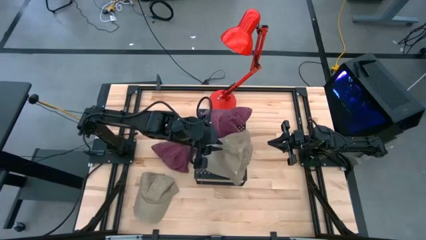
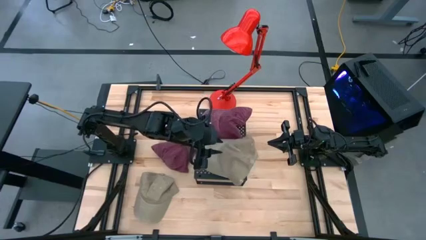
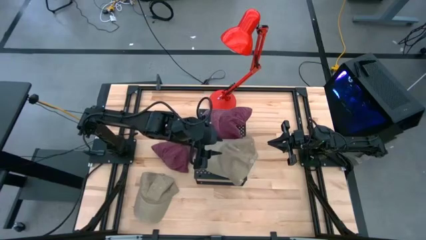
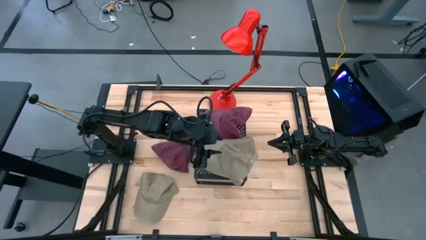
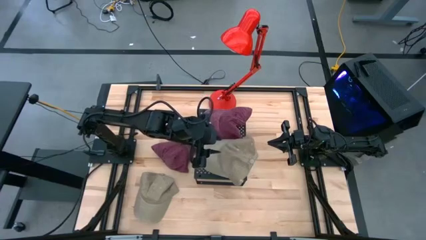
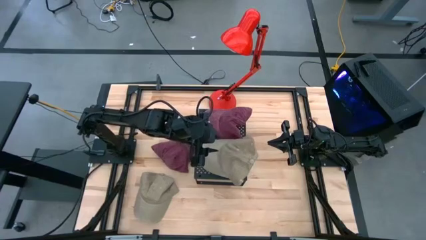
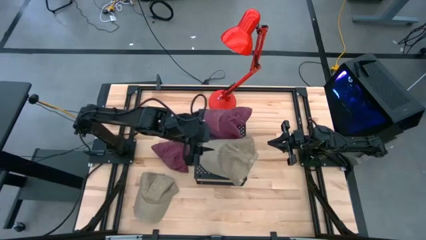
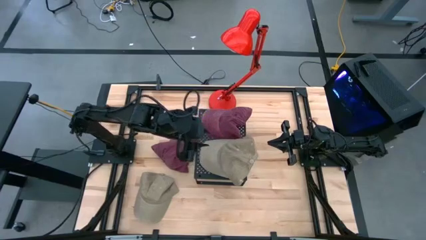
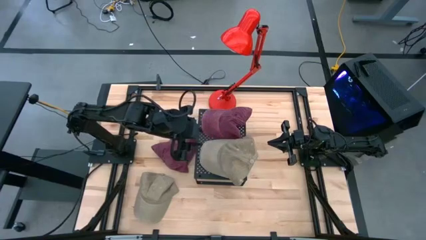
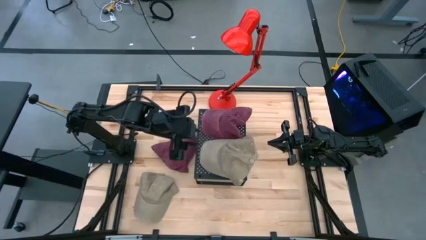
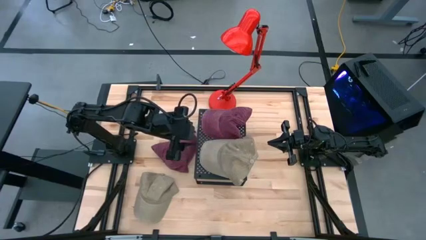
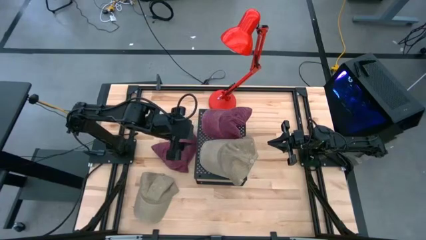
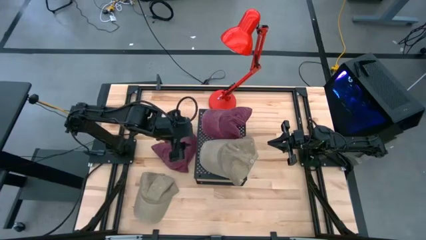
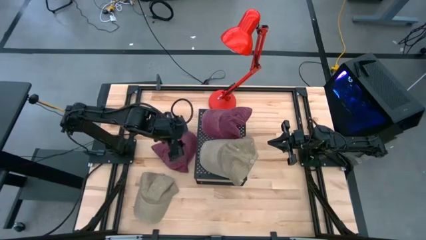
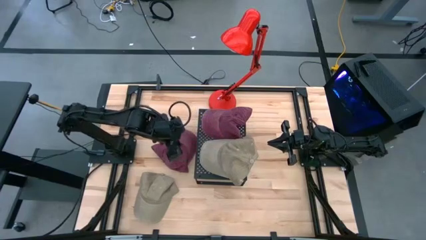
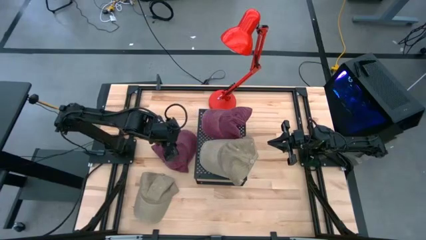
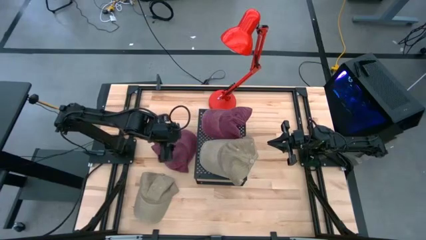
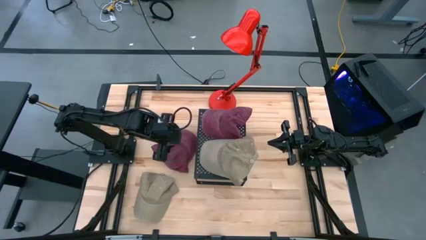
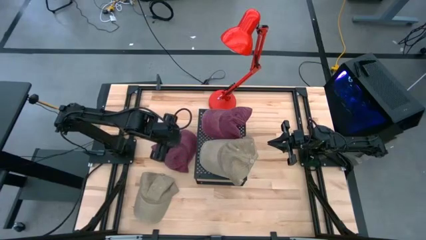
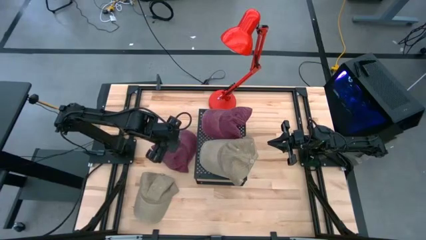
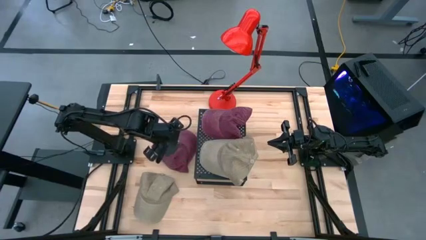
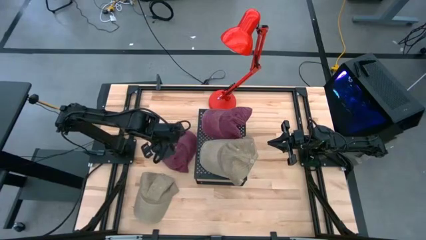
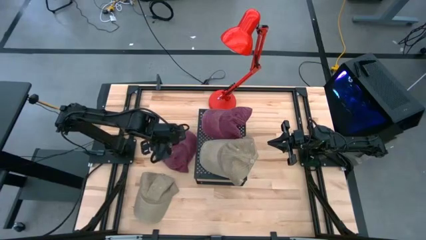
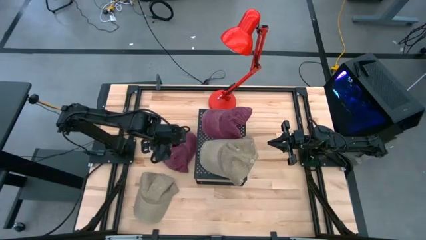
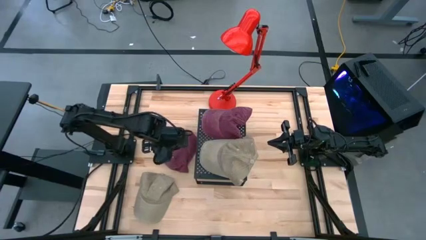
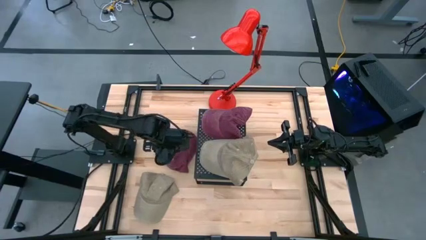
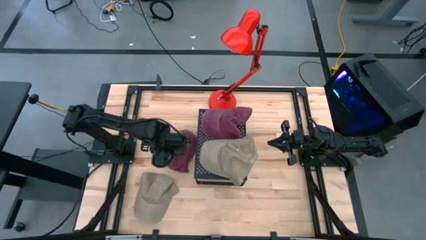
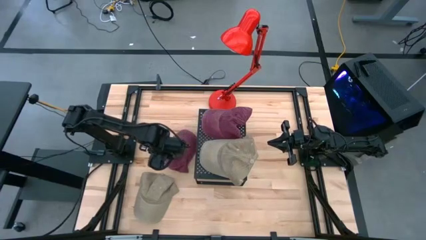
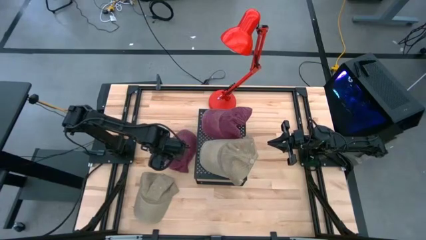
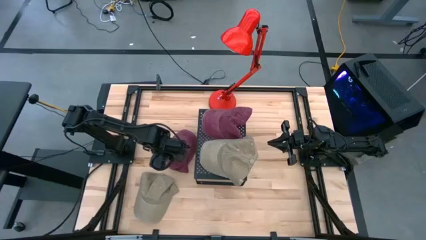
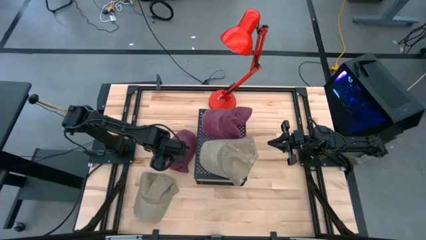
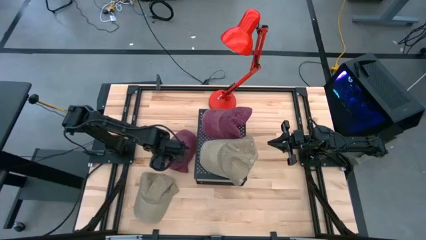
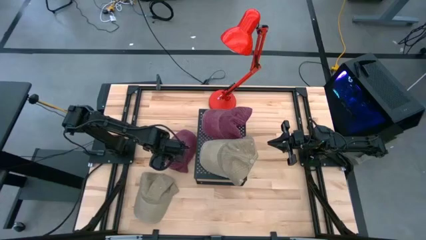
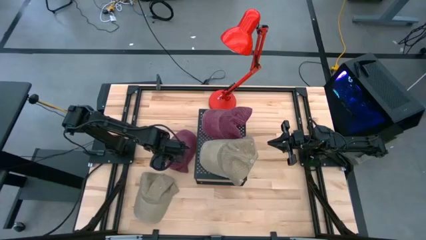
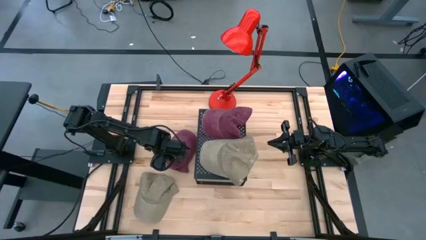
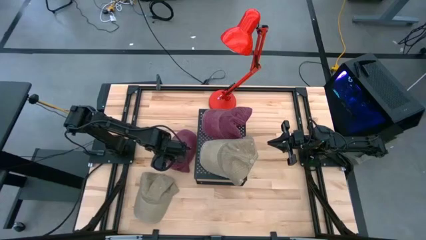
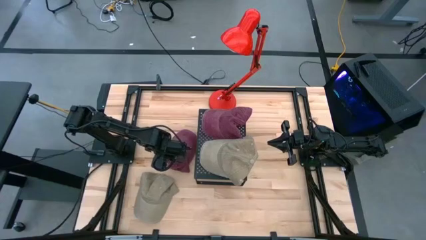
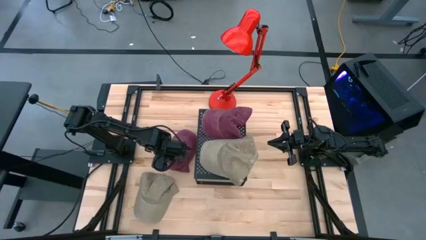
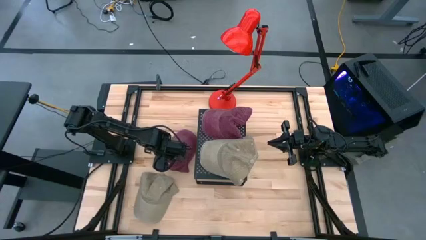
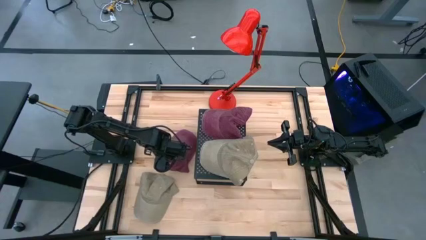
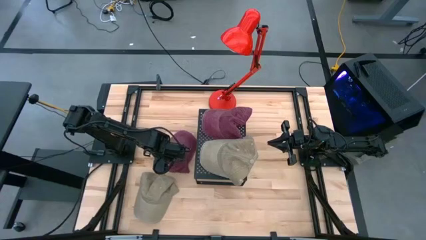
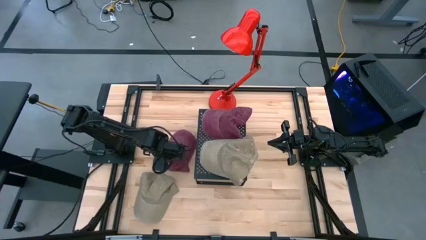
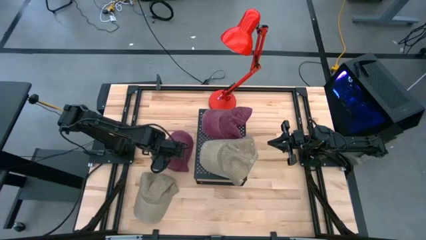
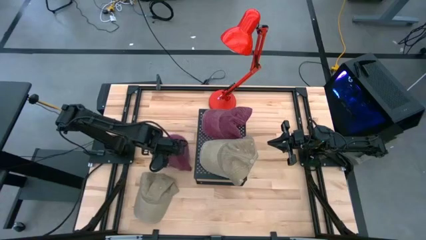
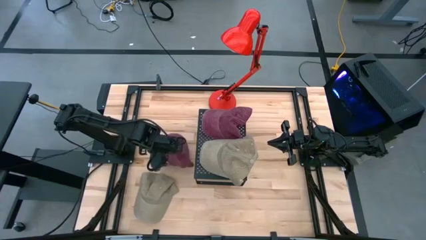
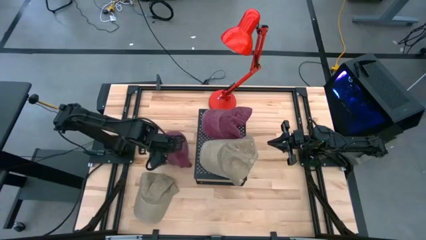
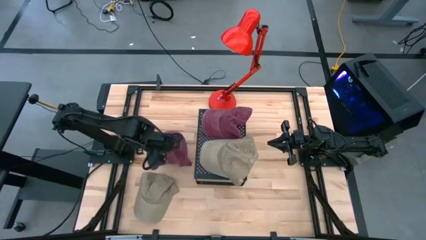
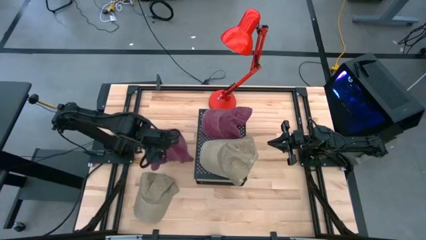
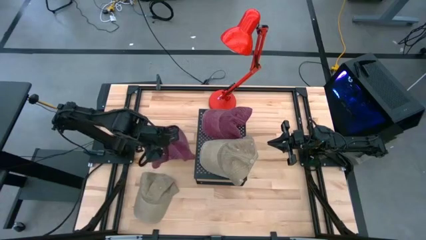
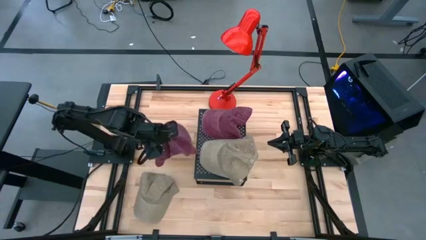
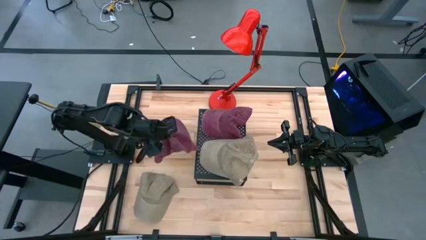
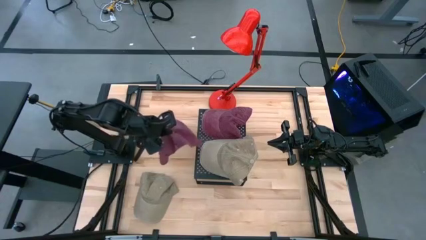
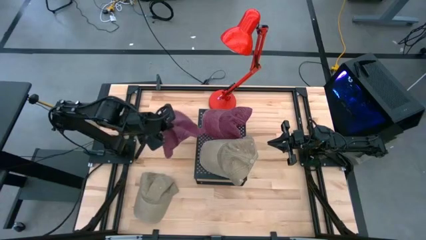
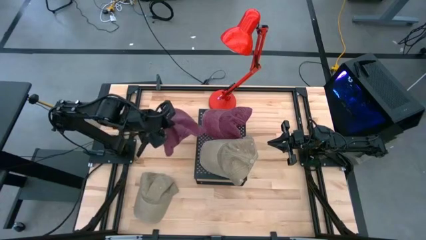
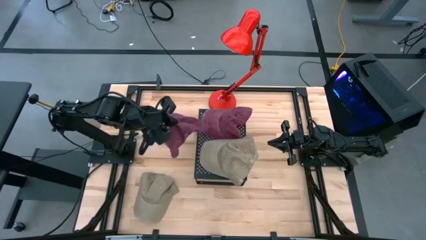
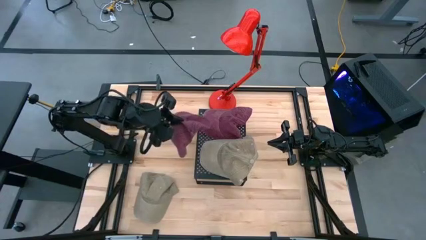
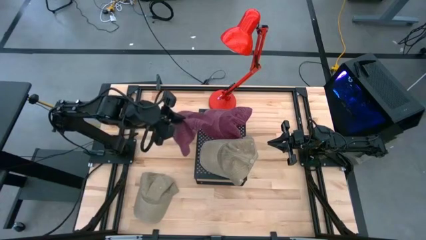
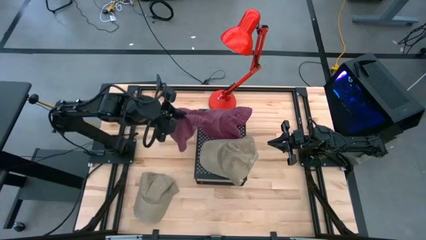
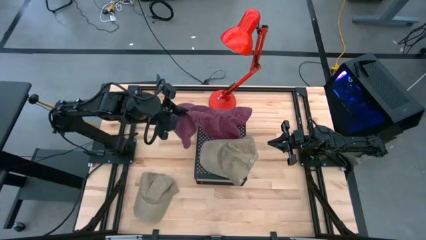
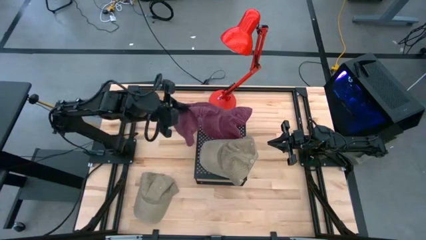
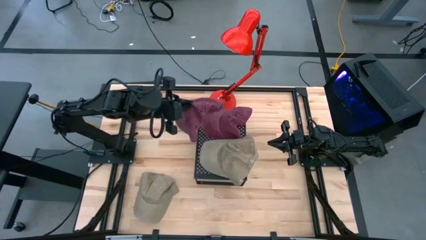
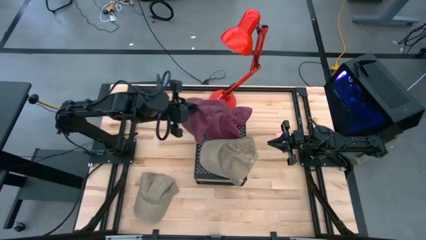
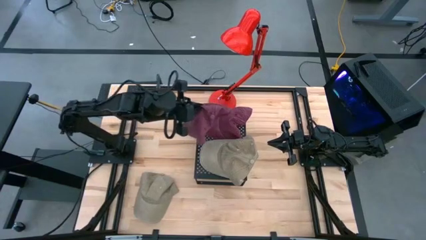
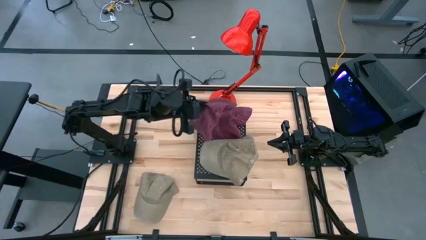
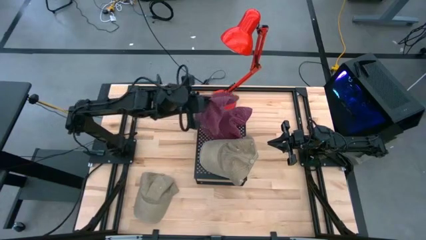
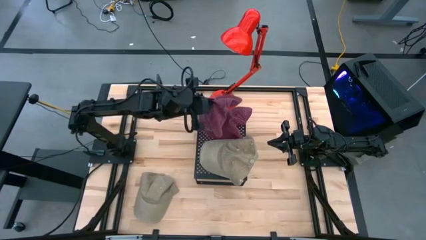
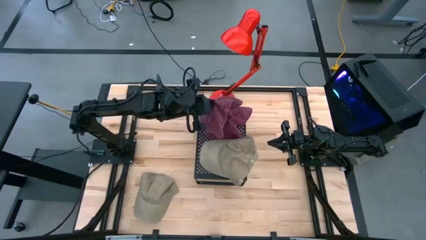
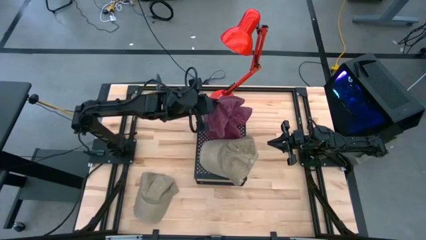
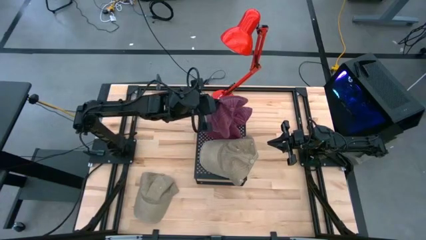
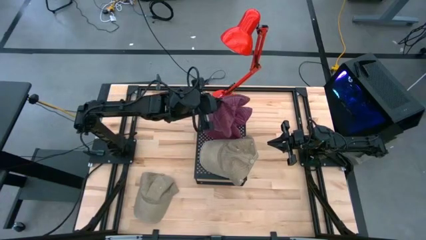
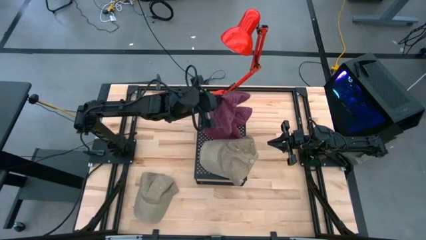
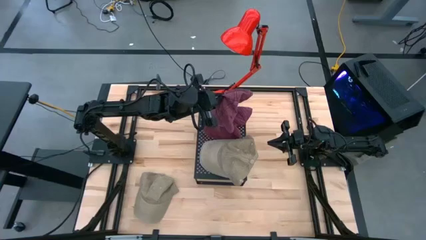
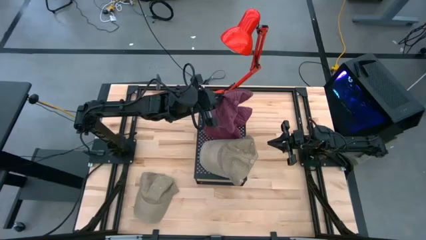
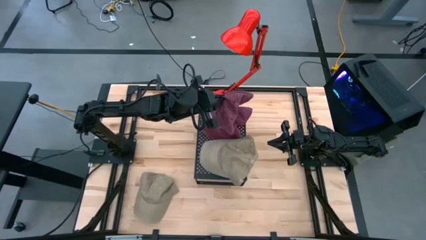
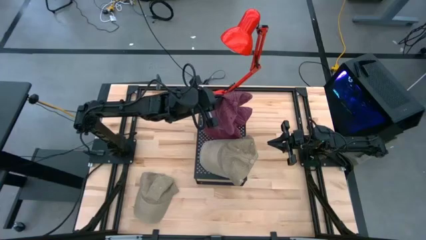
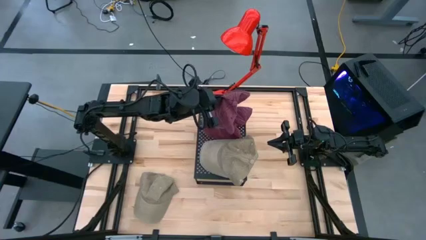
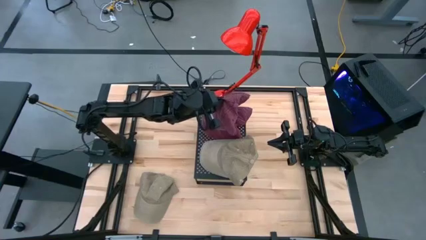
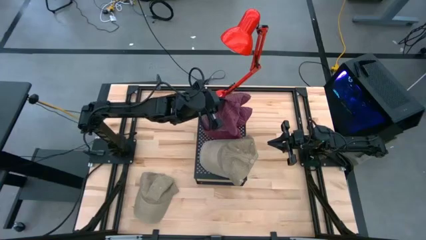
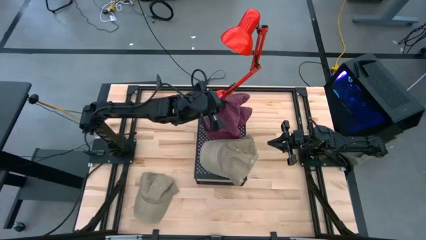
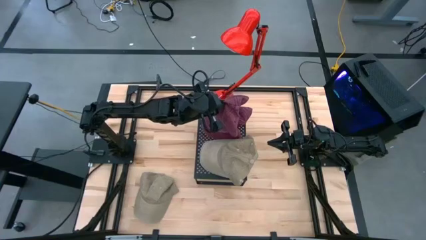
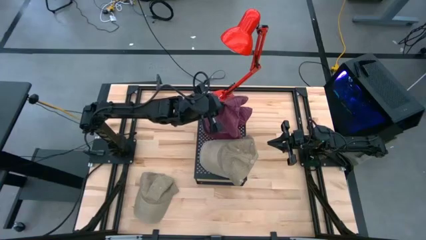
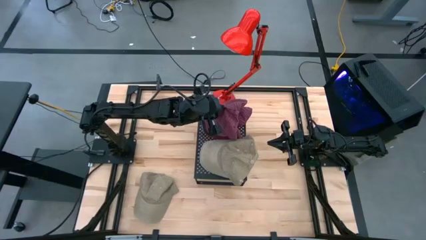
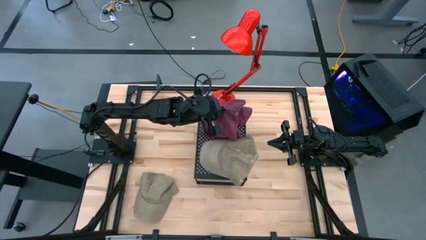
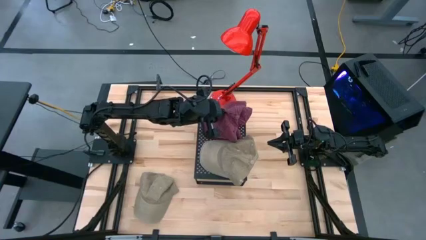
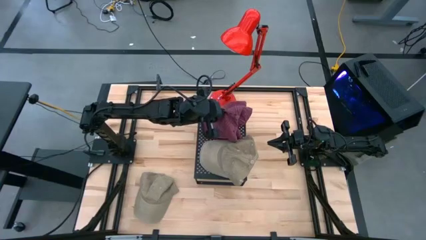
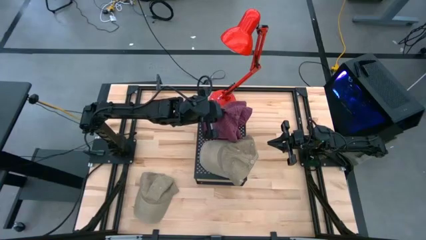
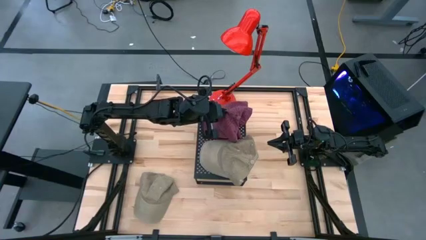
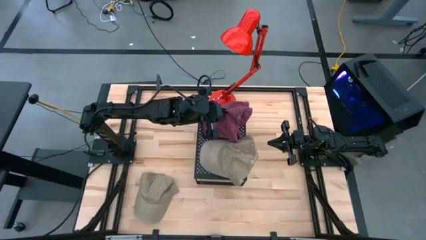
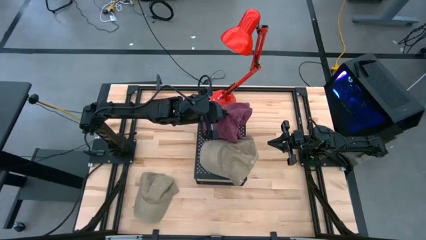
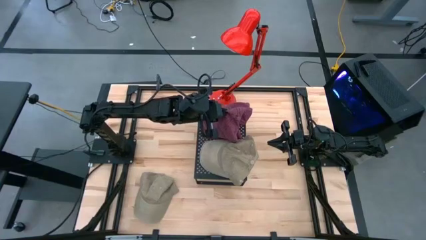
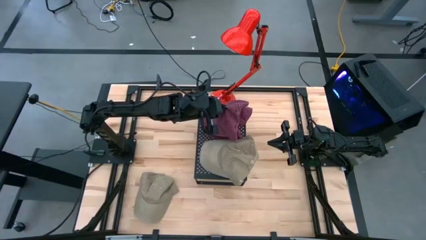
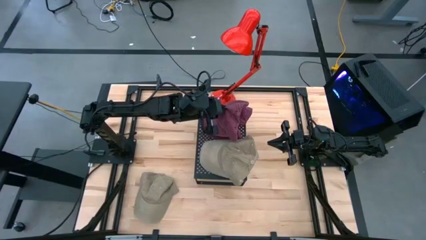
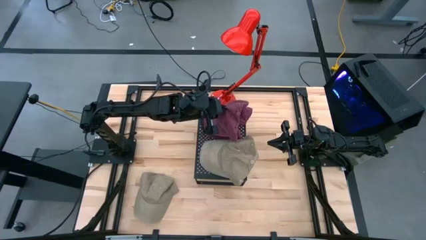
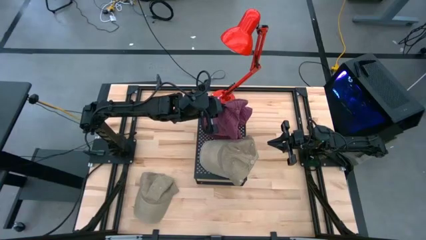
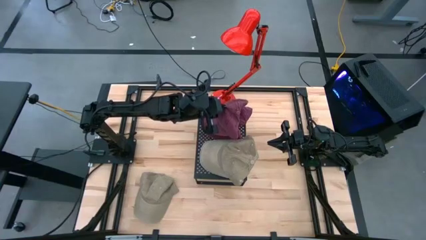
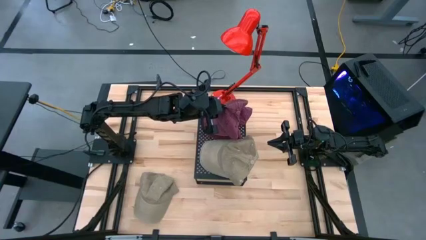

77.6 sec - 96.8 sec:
Task: Pick & Place hat
Stack the red cap on top of the red cap on the shelf
